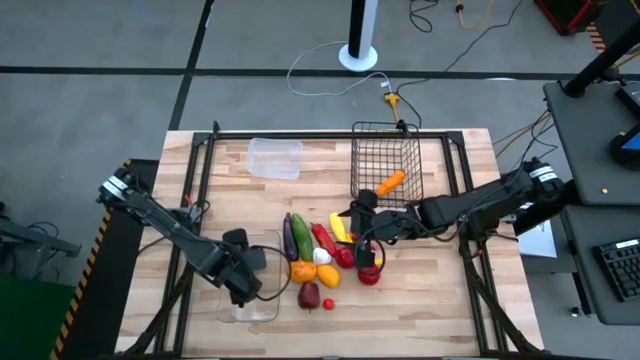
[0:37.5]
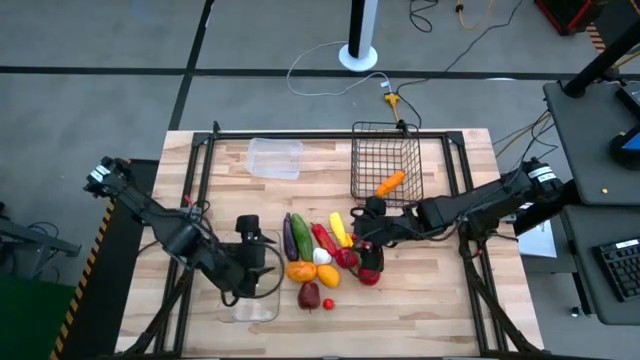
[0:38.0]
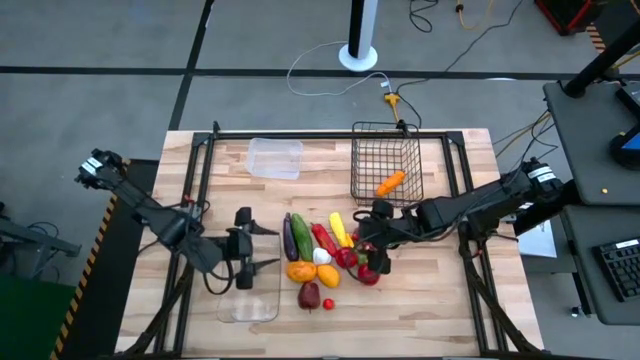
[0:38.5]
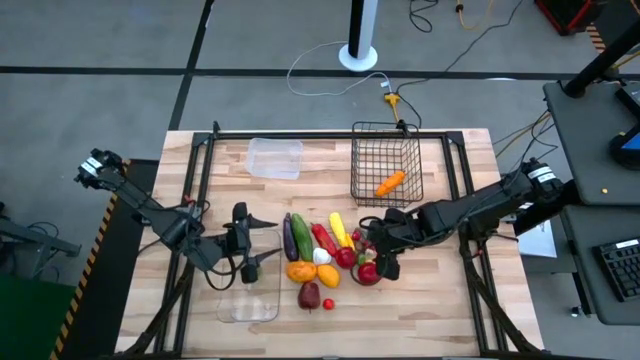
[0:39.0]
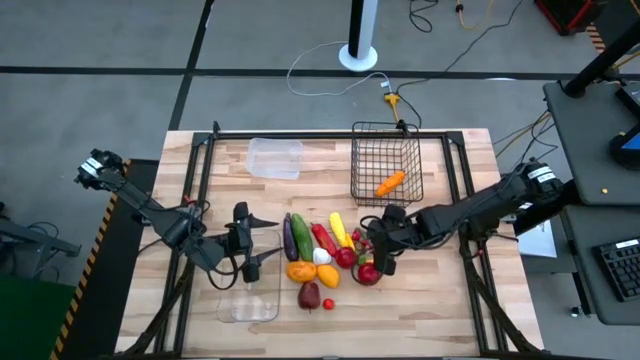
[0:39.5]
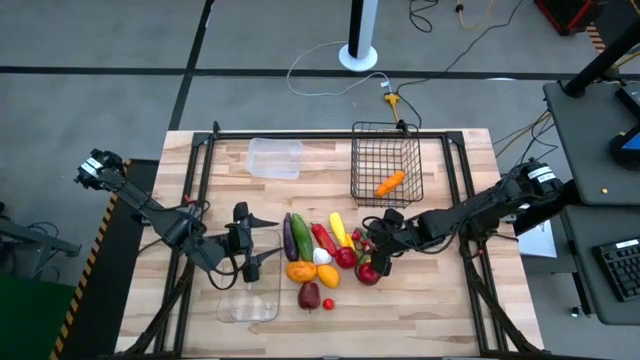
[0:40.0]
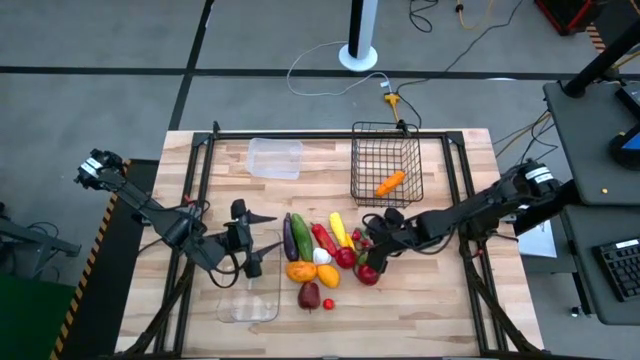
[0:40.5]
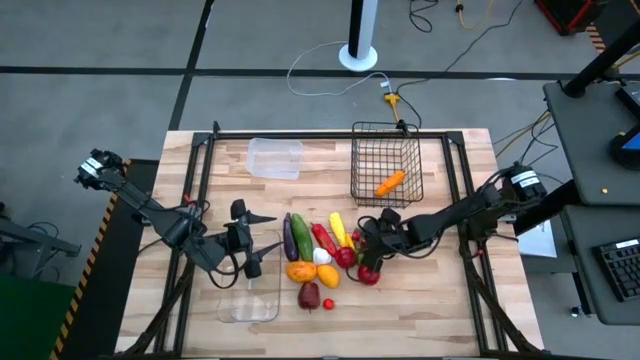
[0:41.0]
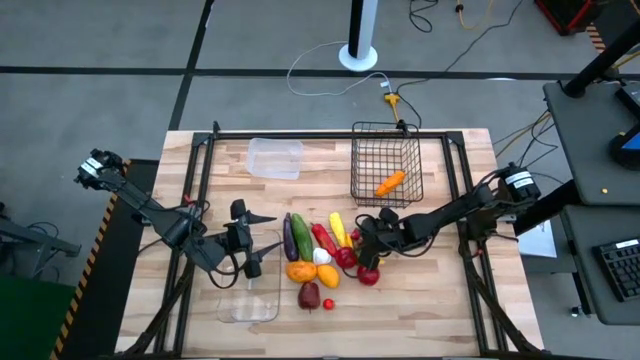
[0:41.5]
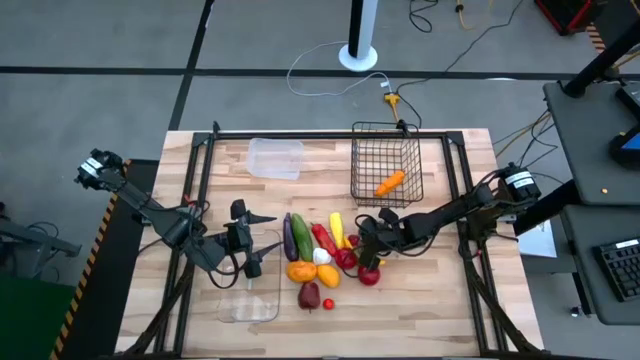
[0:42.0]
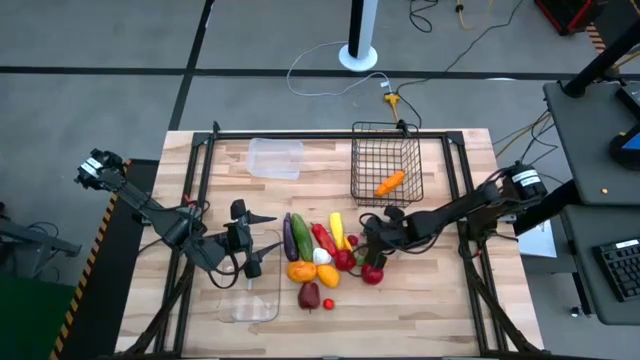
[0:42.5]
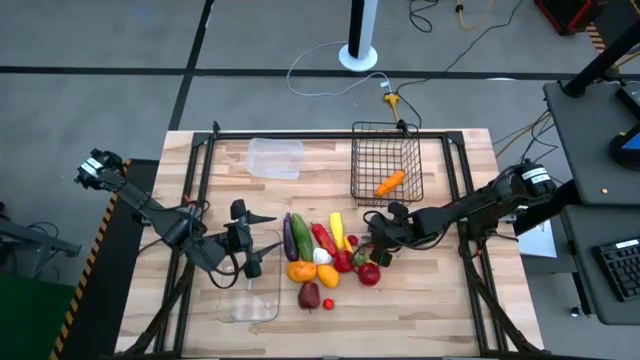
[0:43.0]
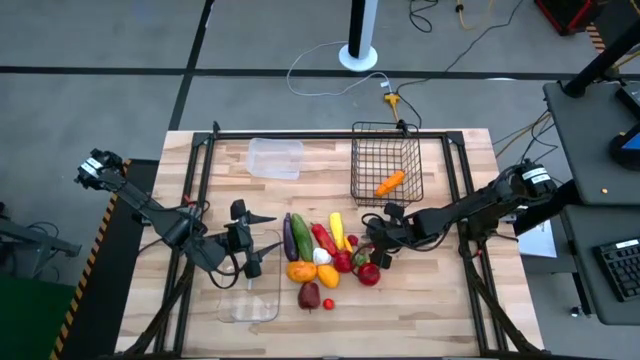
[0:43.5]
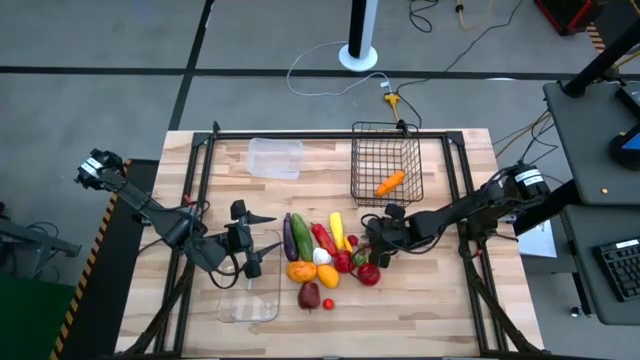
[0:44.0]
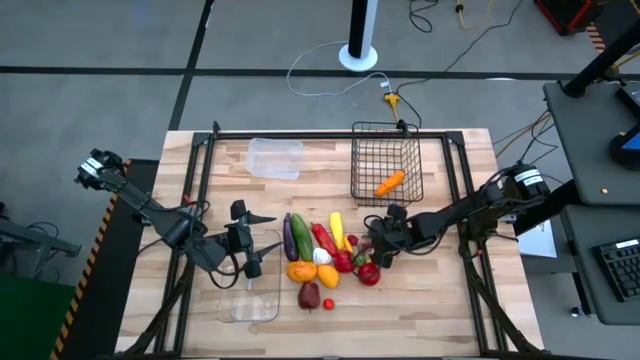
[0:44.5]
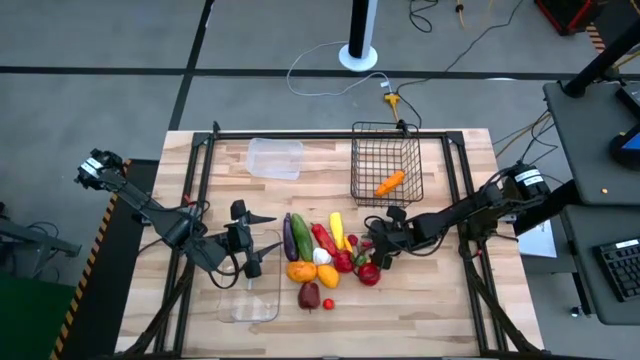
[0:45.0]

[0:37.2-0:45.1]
Task: Sort produce into baskets
Put the green chili into the wire basket

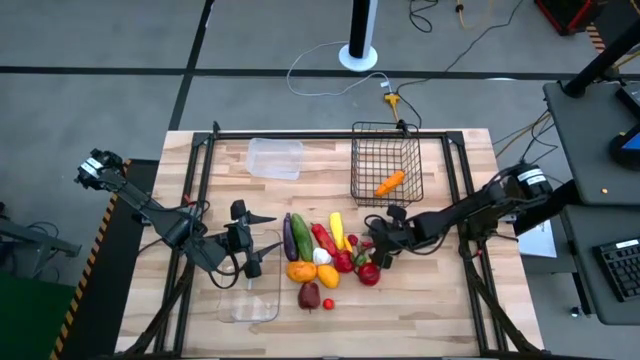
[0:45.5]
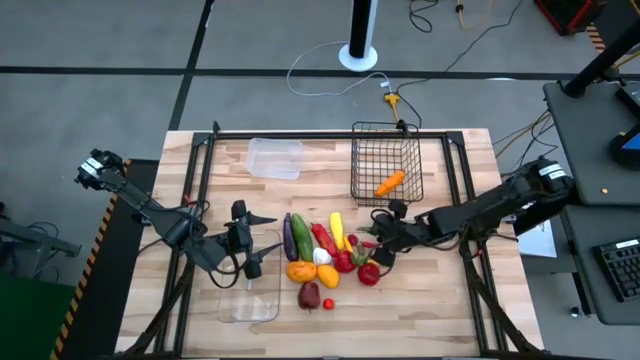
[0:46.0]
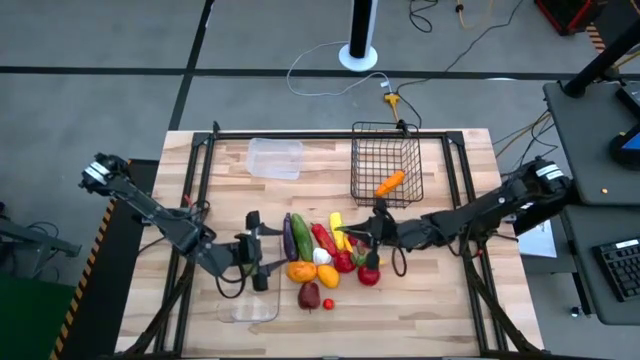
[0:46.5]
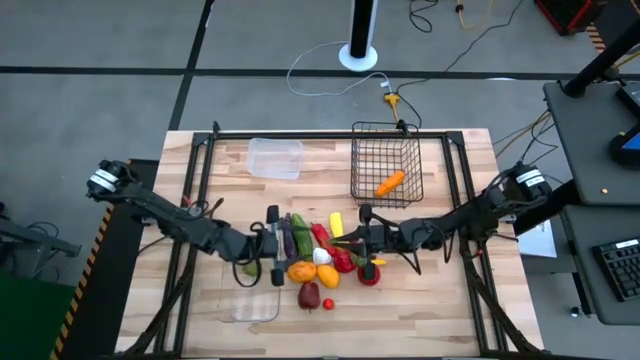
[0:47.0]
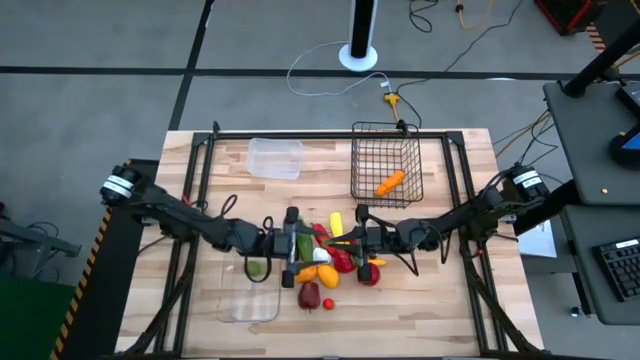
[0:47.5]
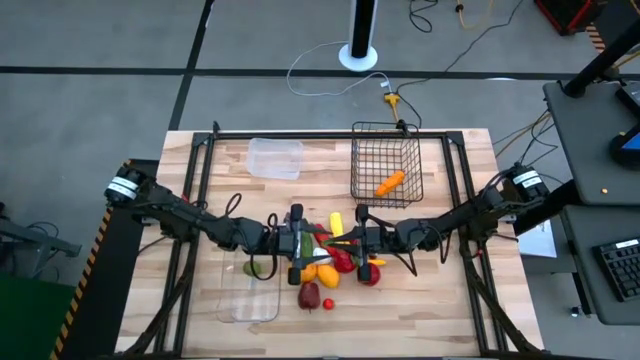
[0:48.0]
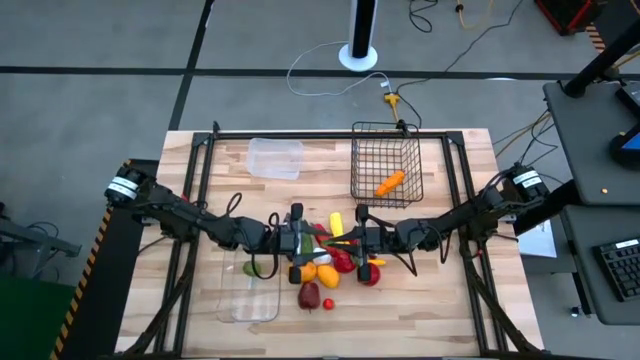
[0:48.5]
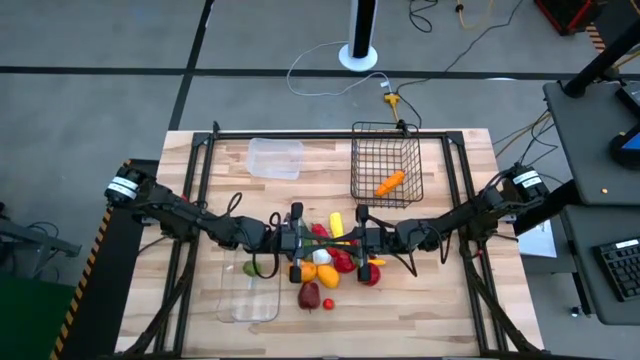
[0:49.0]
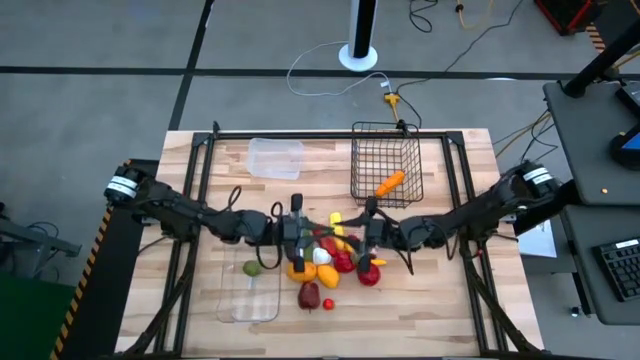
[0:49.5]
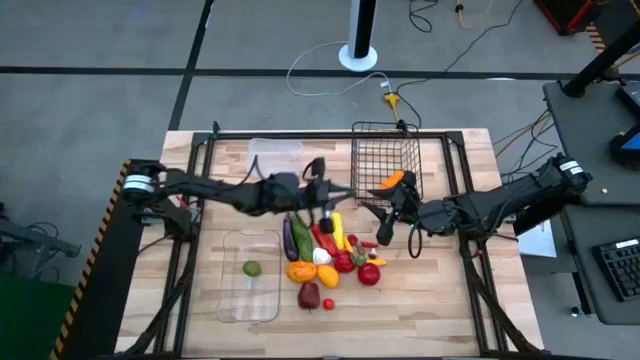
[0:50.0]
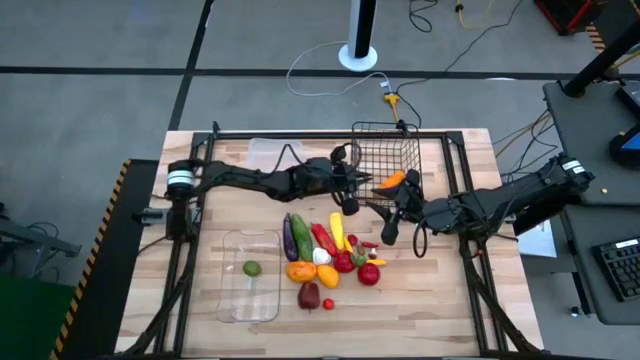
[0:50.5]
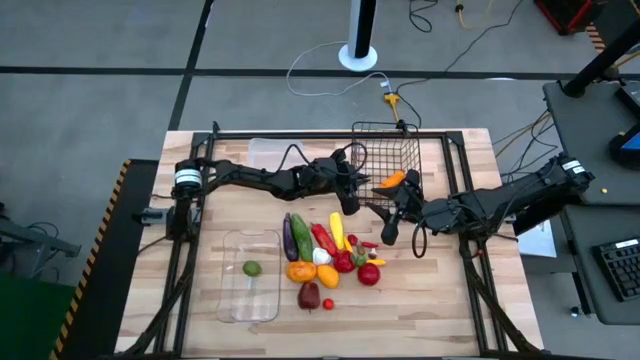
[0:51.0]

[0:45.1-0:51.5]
Put the green chili into the wire basket

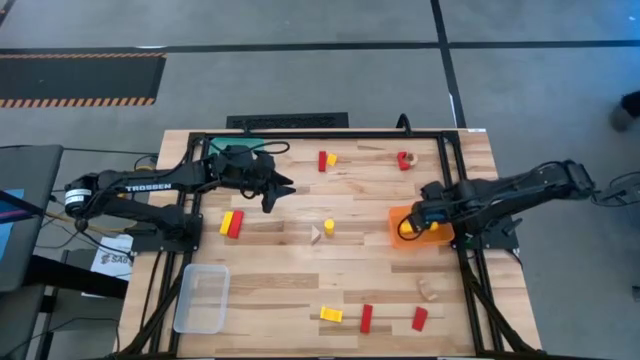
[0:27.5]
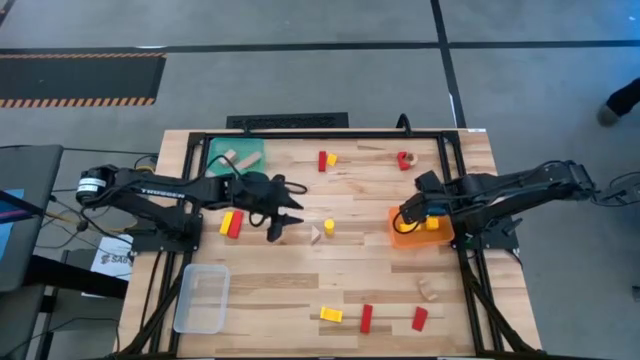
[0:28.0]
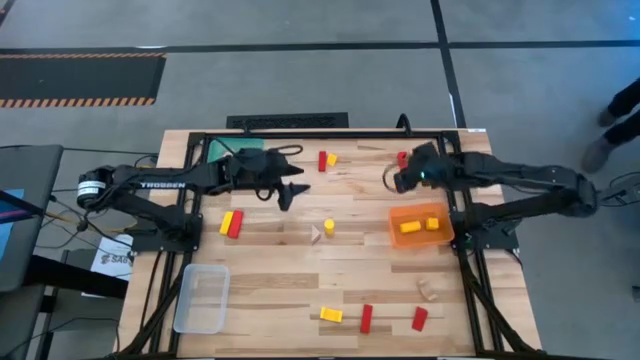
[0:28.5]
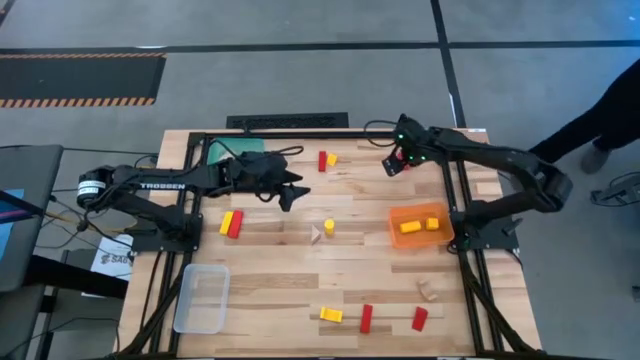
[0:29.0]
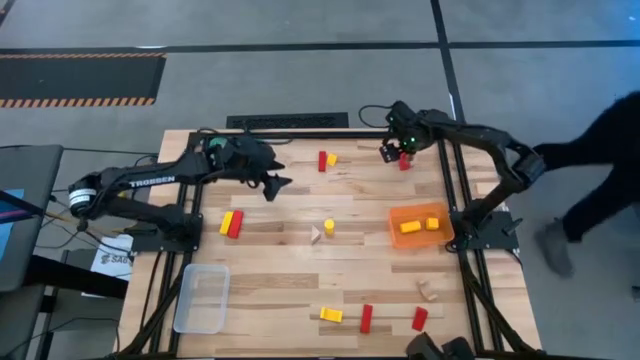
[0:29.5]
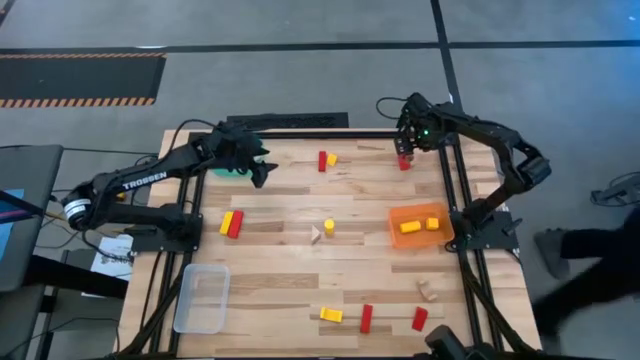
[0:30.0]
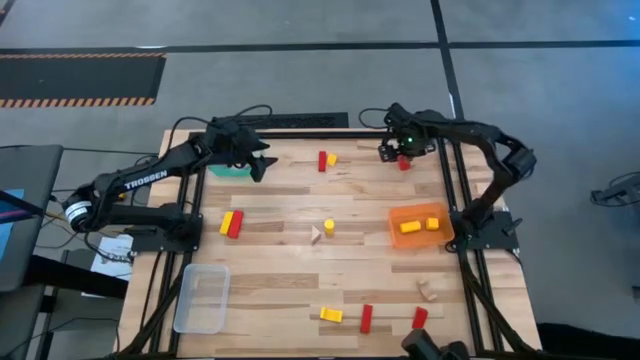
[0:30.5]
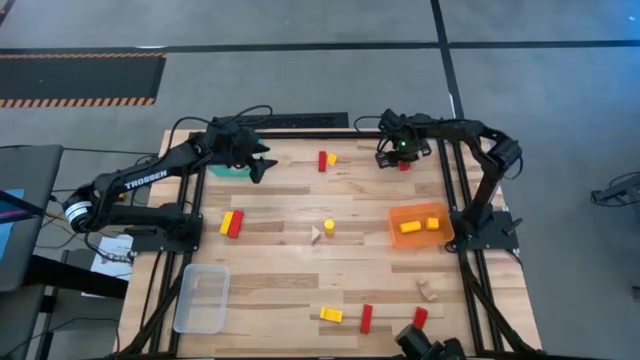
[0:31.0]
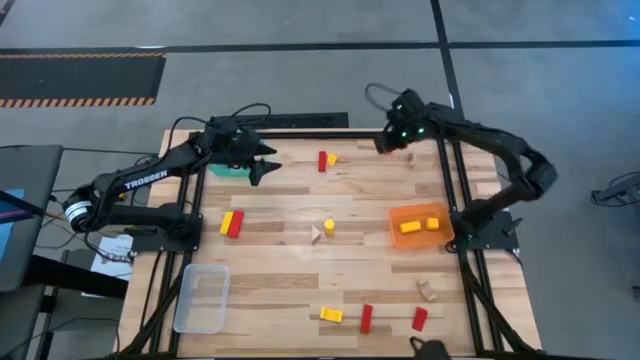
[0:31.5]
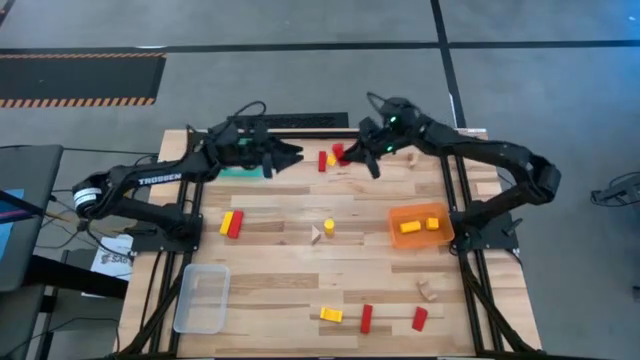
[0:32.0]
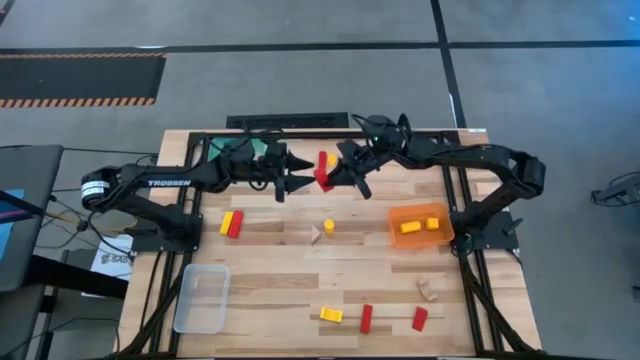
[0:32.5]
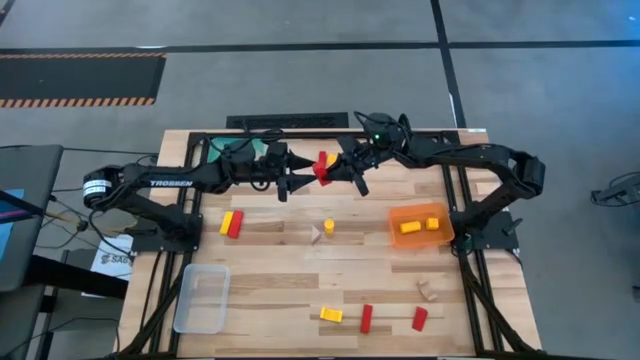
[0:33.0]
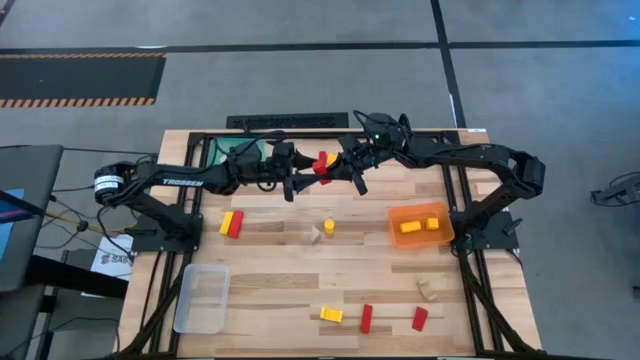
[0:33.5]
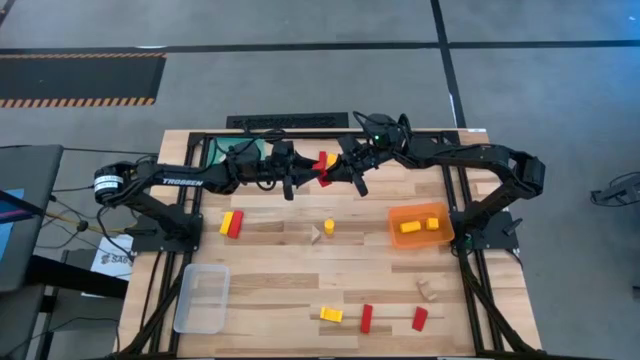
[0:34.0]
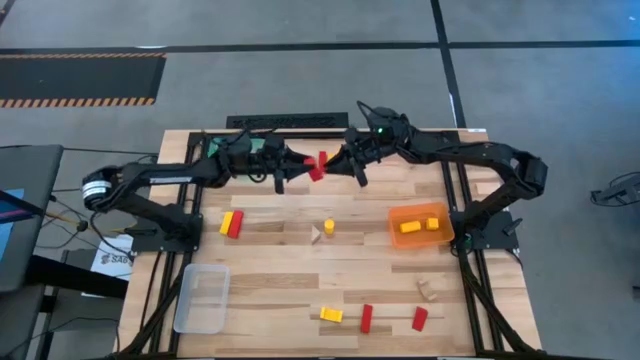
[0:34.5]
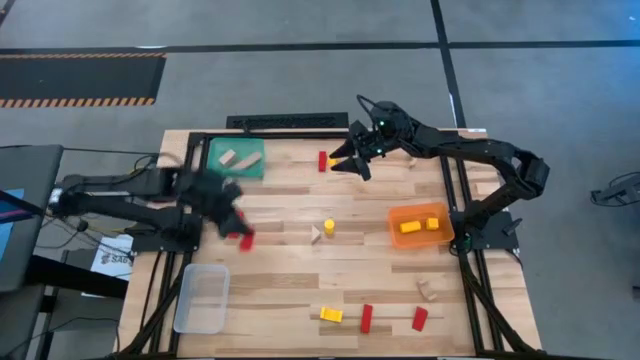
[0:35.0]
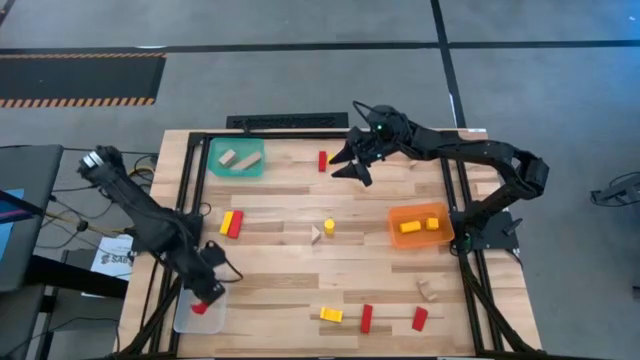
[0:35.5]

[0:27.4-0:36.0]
Task: Sort & place blocks by color
Put the red block into the transparent bin
